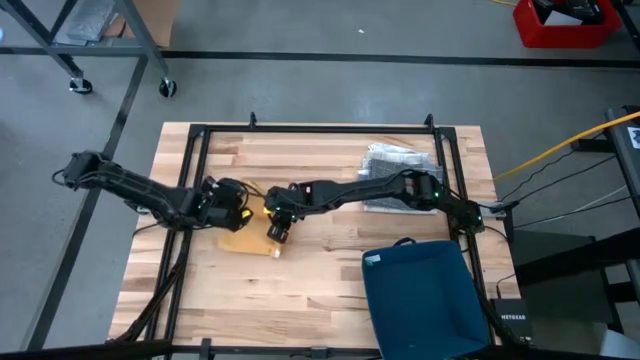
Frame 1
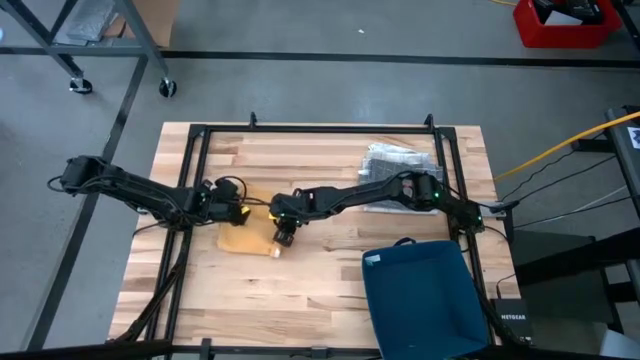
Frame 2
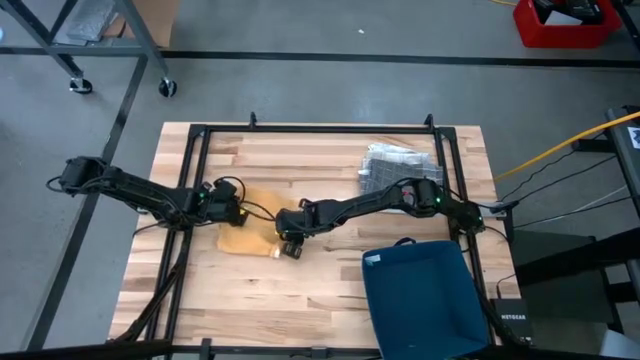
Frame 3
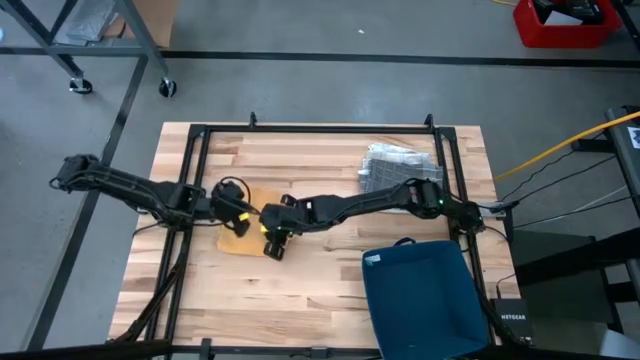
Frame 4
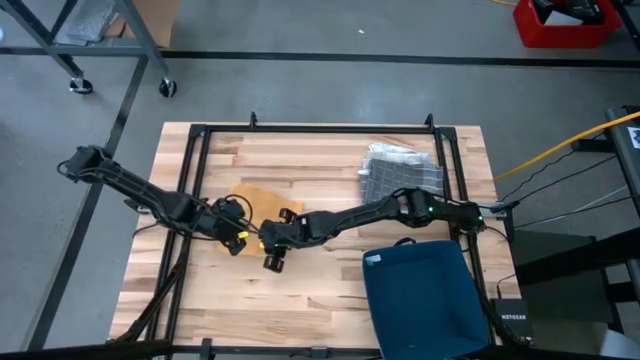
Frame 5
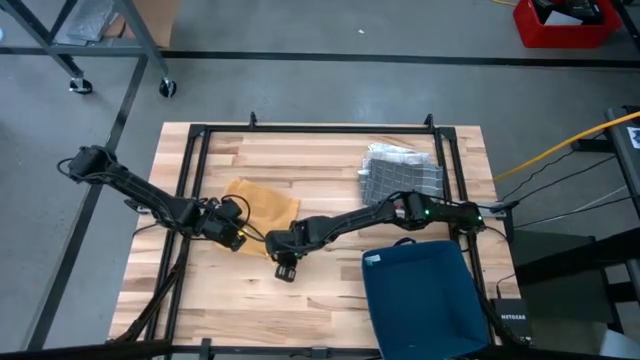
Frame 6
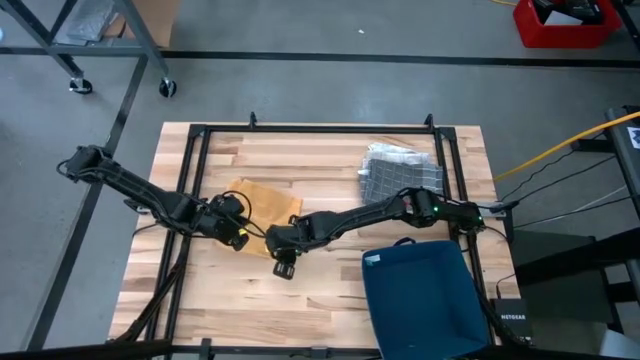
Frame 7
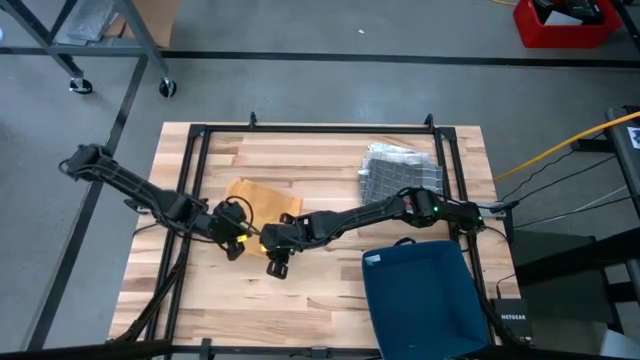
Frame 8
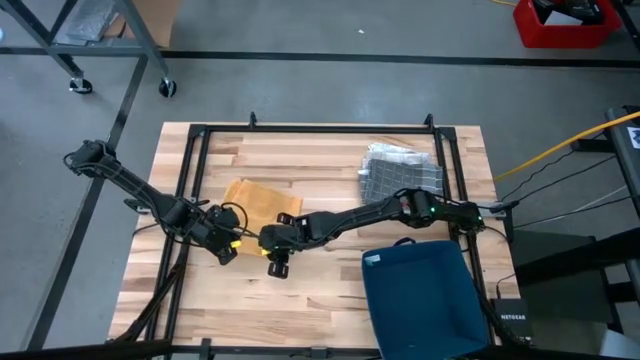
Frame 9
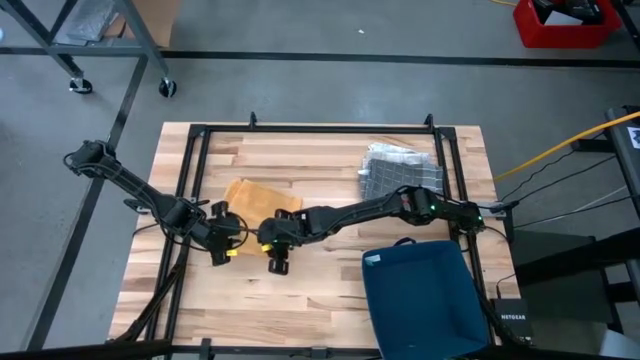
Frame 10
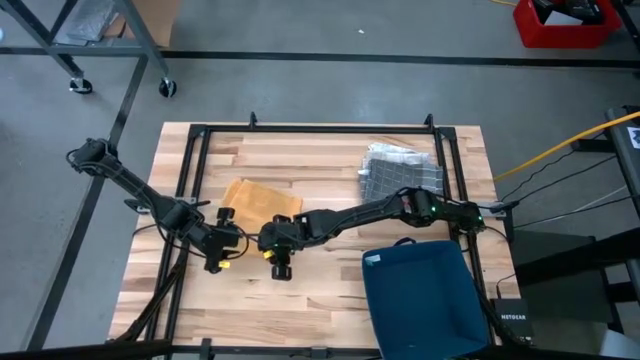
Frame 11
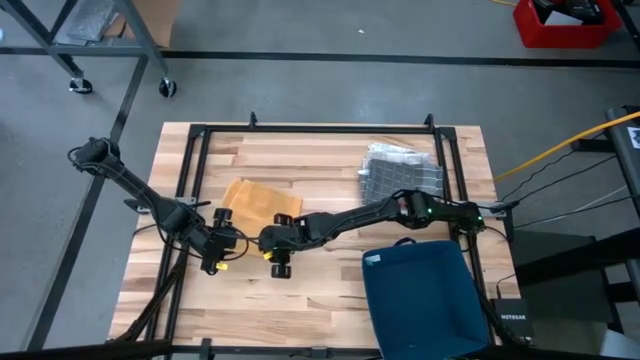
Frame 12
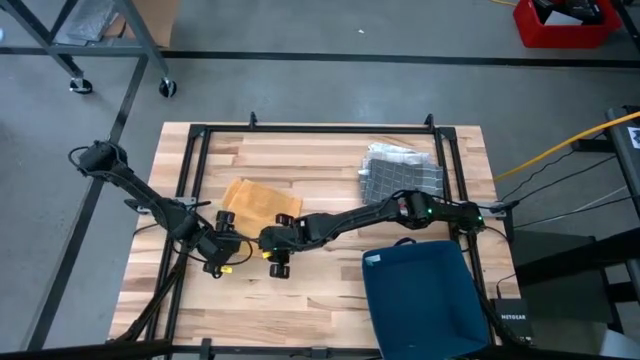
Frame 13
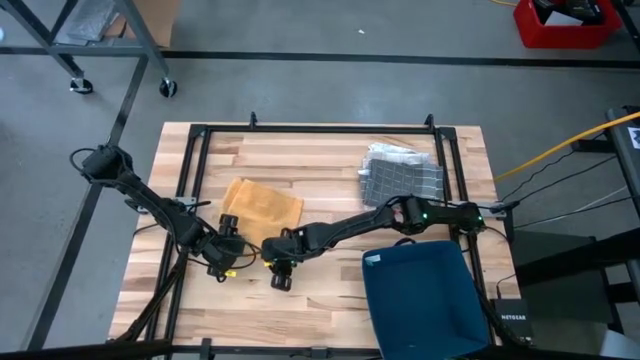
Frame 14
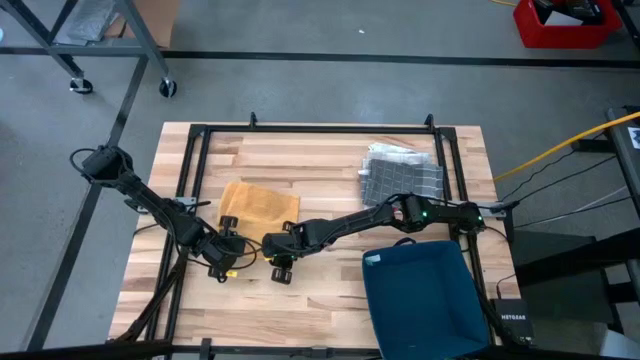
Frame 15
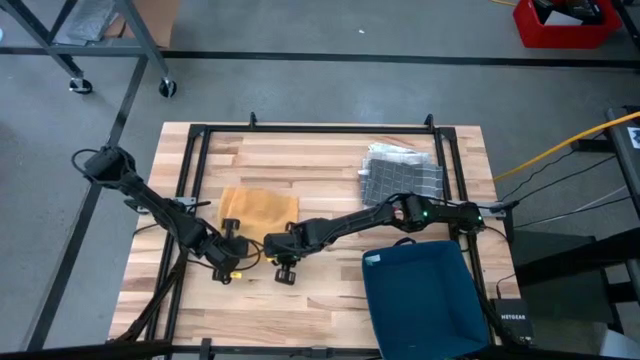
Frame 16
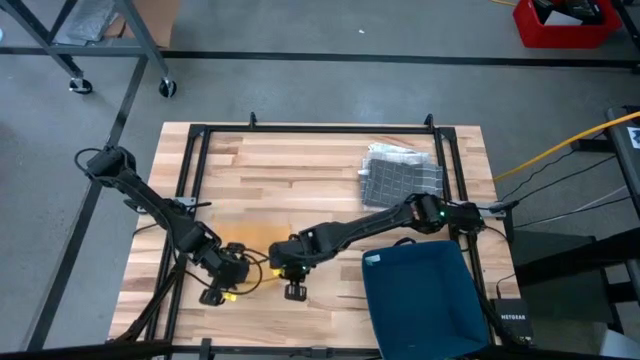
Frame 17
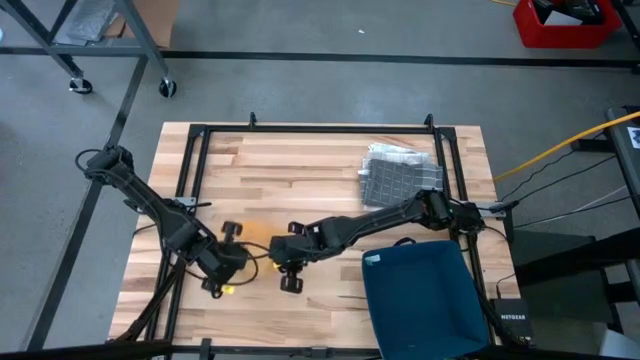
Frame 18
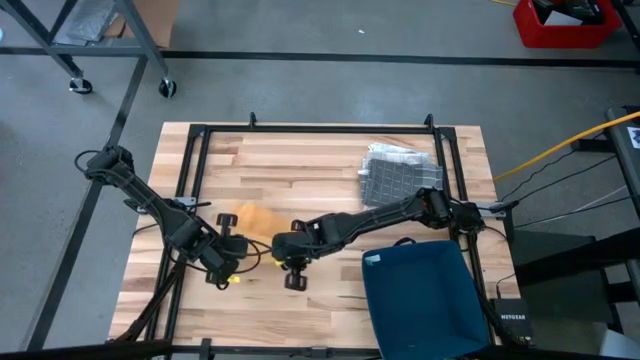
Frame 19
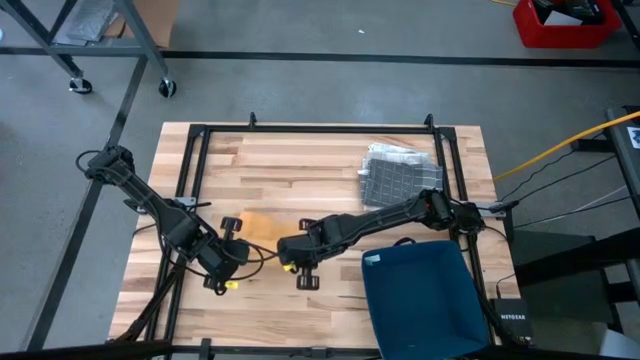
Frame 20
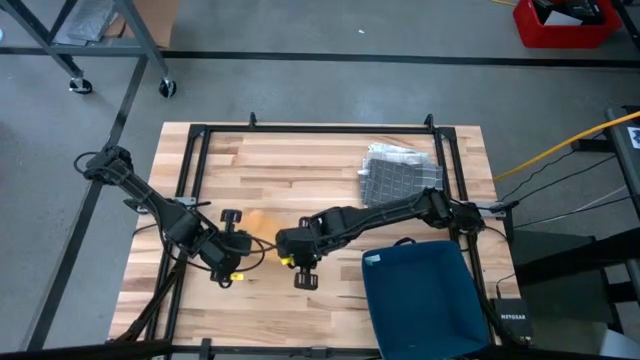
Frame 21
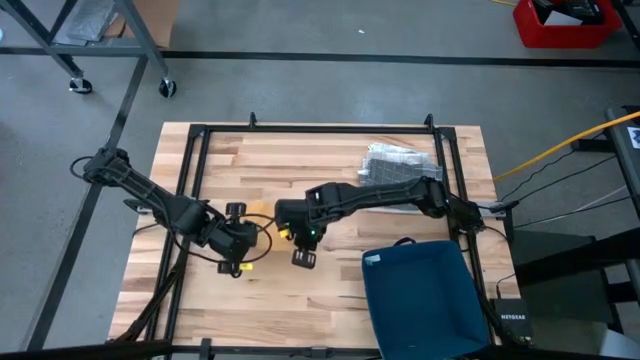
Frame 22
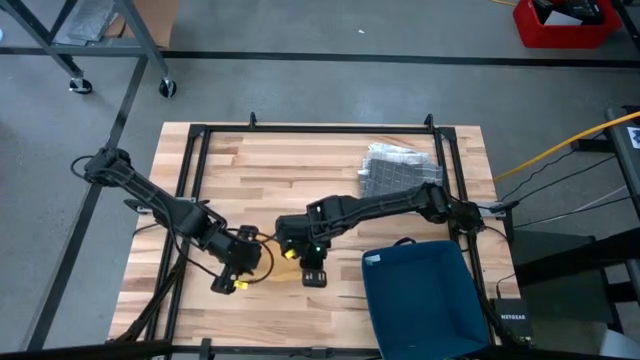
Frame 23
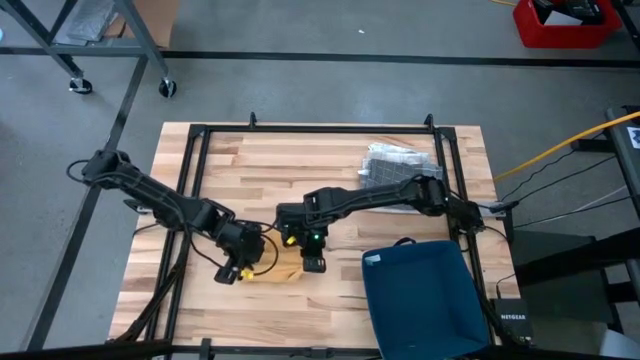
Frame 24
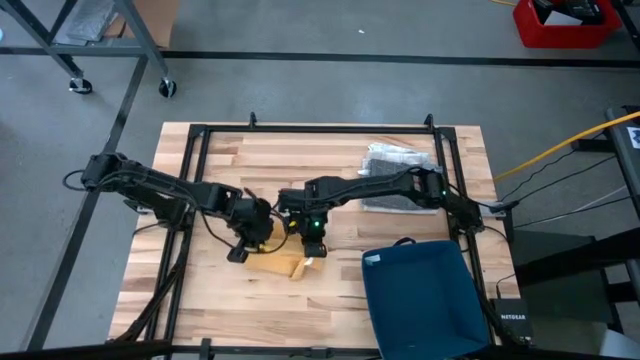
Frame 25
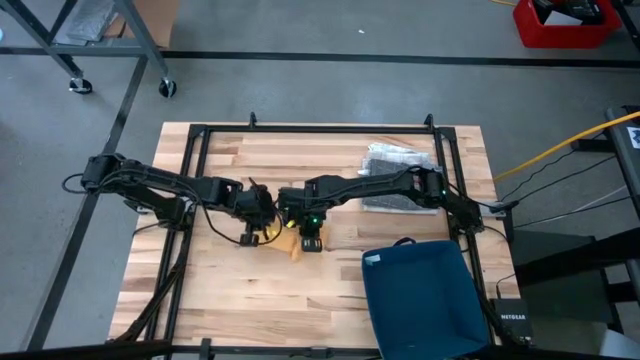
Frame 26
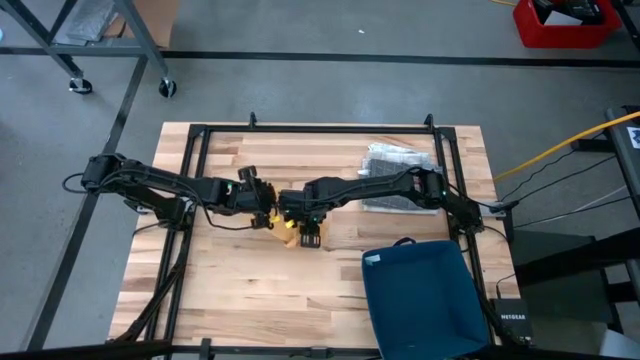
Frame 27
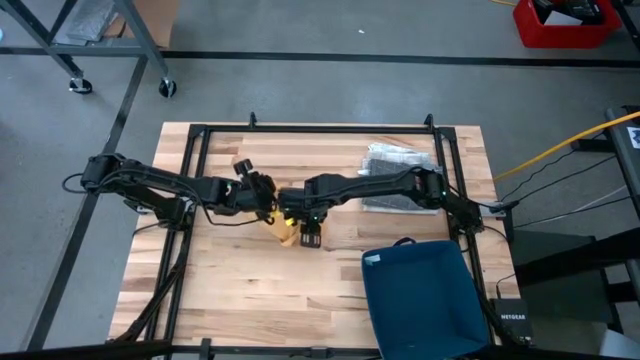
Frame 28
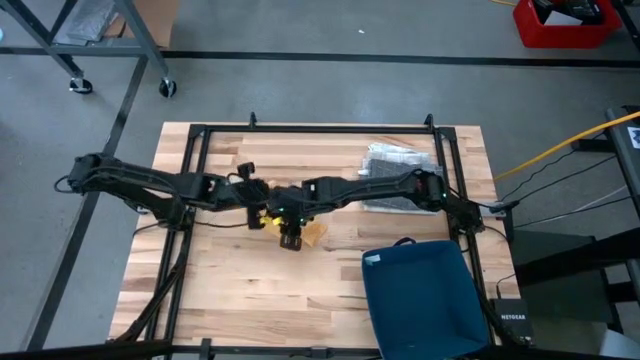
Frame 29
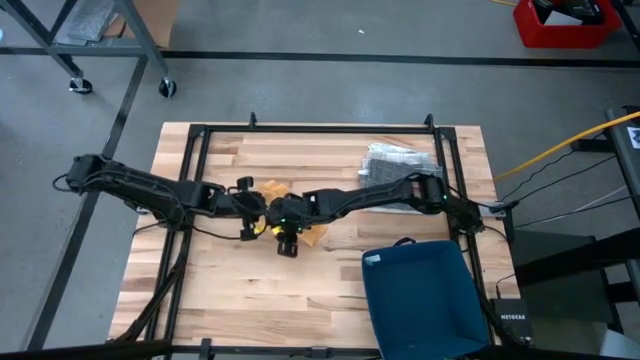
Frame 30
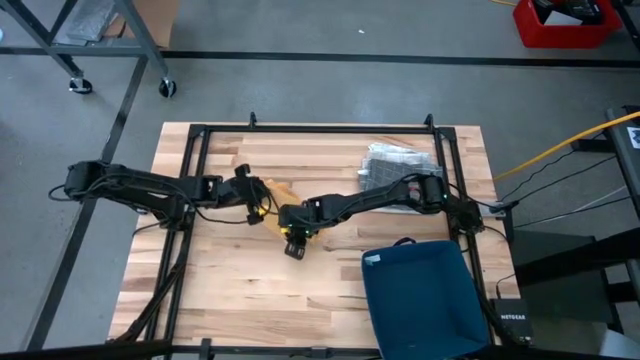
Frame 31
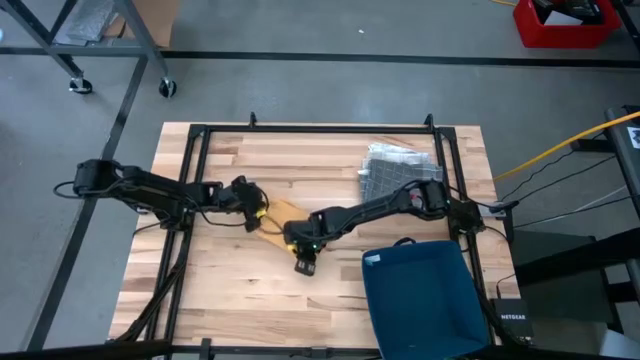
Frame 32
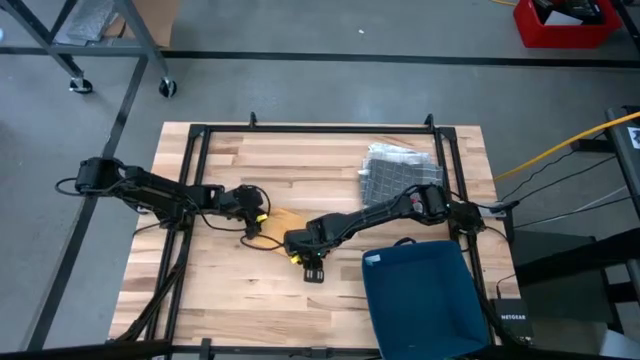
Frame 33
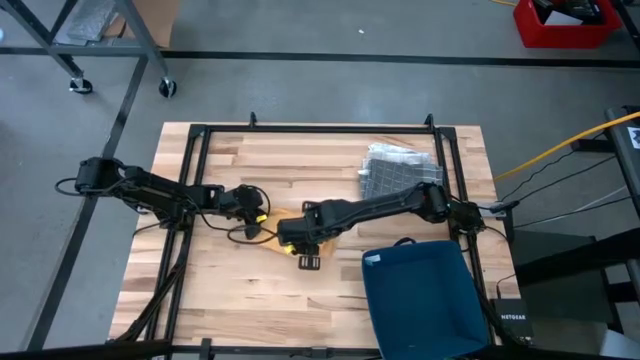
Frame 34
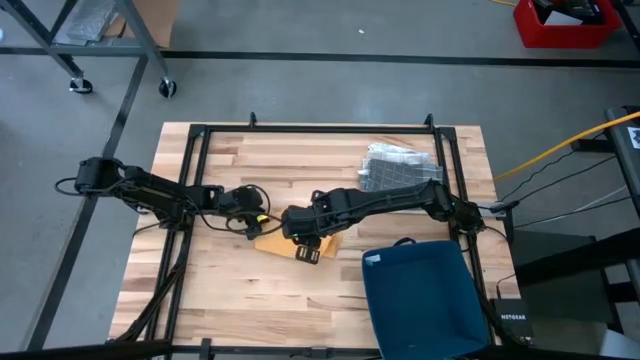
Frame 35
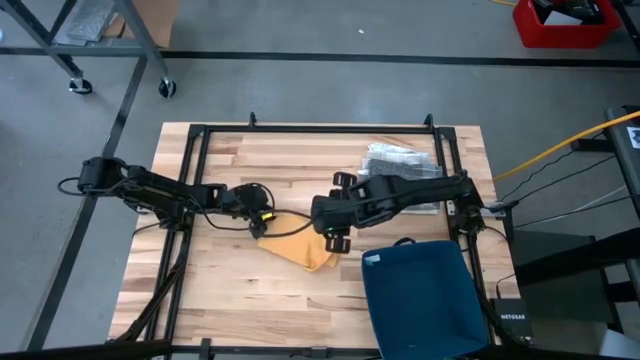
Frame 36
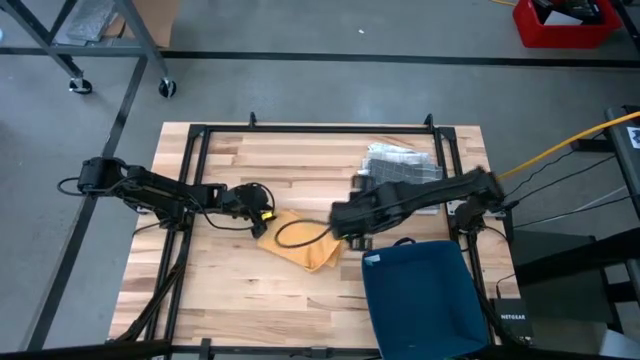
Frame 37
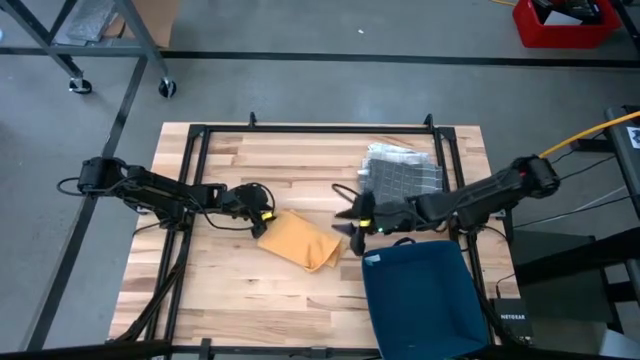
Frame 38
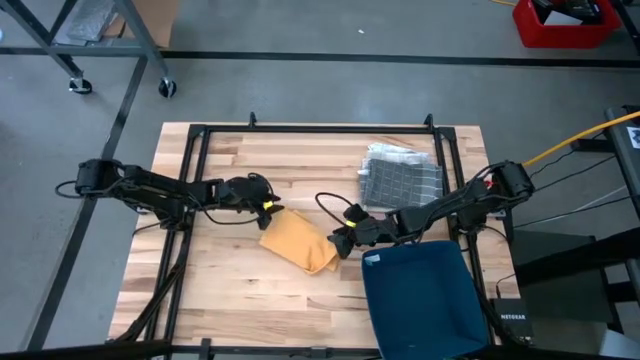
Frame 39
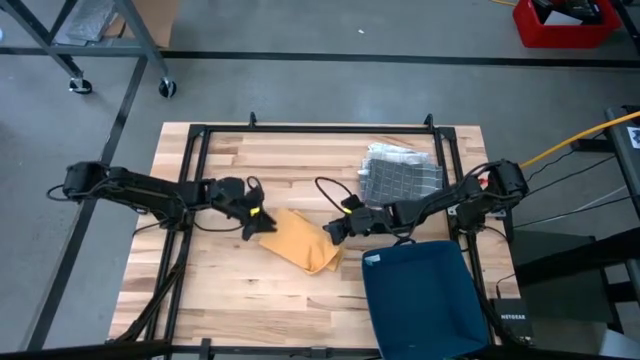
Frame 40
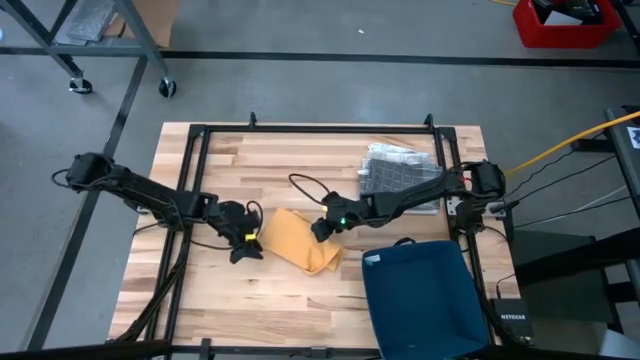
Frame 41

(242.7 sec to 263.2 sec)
Task: Fold towel
Fold yellow towel
